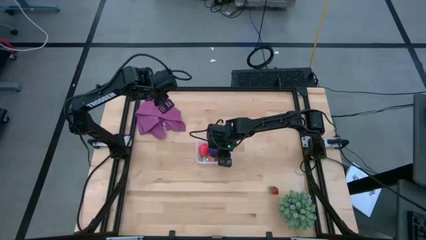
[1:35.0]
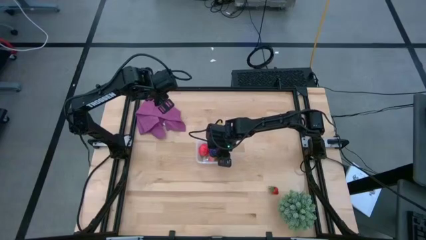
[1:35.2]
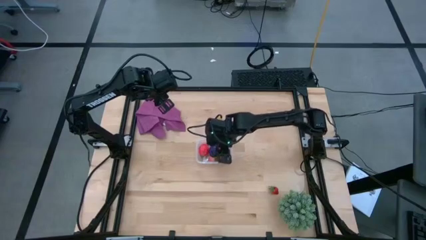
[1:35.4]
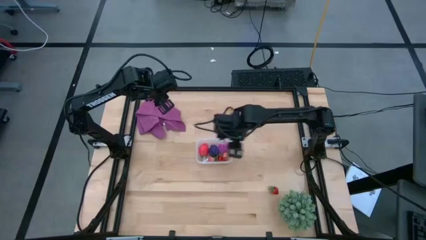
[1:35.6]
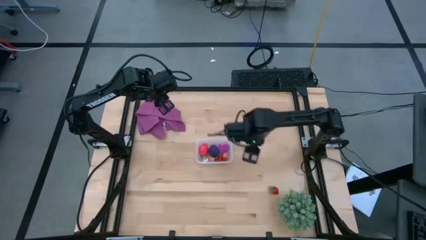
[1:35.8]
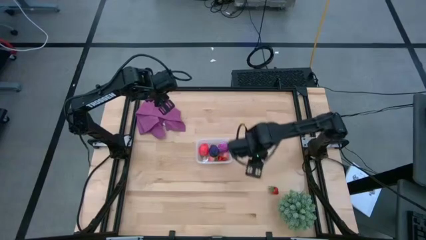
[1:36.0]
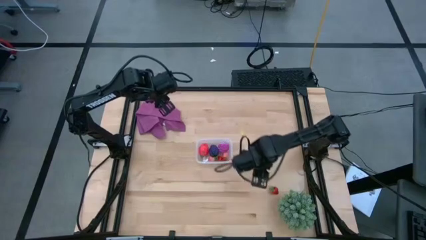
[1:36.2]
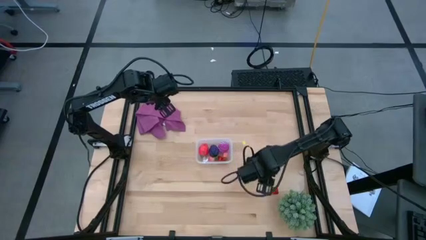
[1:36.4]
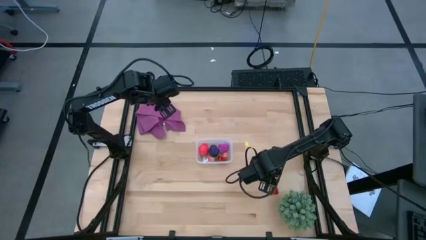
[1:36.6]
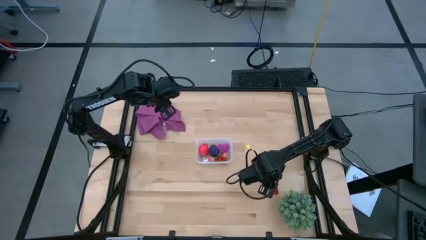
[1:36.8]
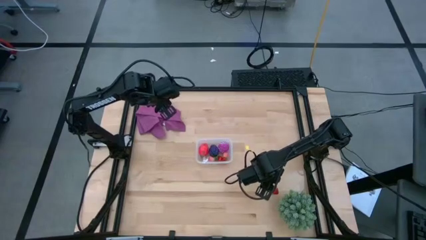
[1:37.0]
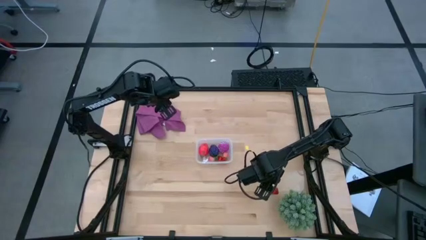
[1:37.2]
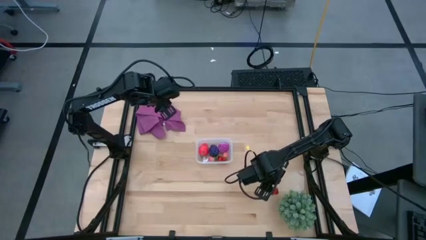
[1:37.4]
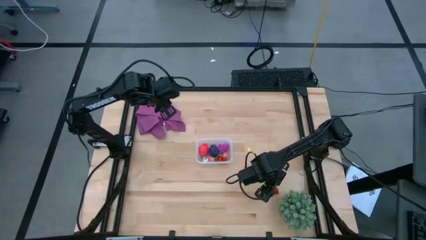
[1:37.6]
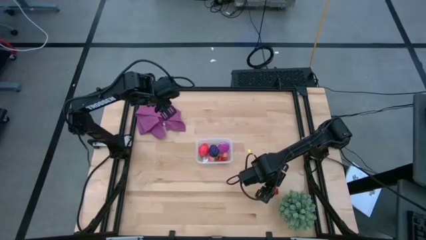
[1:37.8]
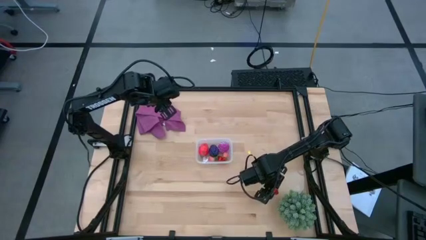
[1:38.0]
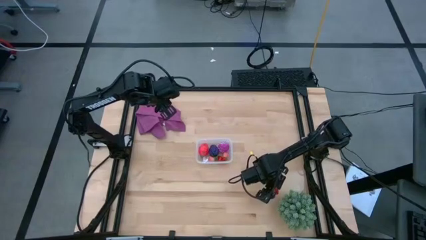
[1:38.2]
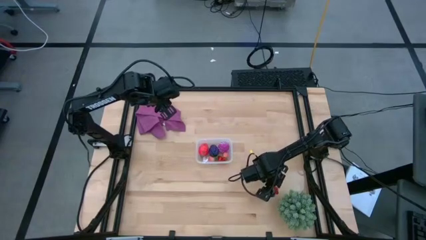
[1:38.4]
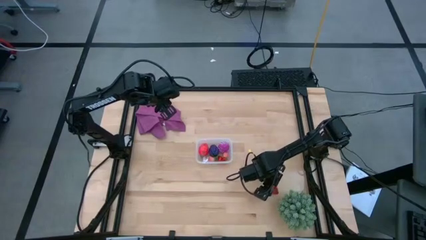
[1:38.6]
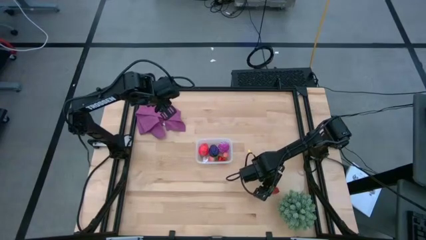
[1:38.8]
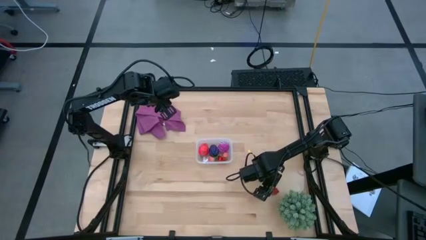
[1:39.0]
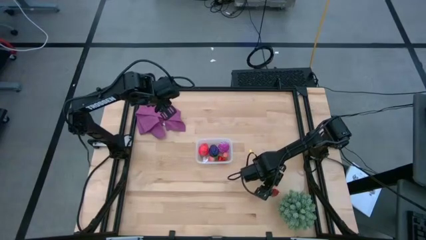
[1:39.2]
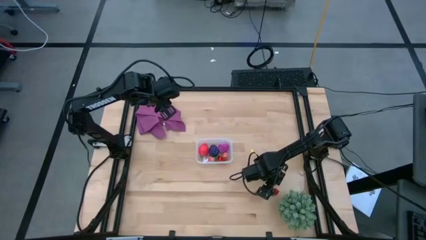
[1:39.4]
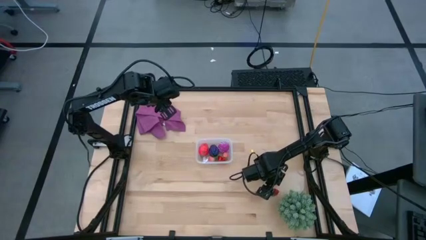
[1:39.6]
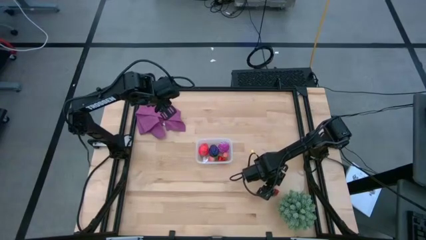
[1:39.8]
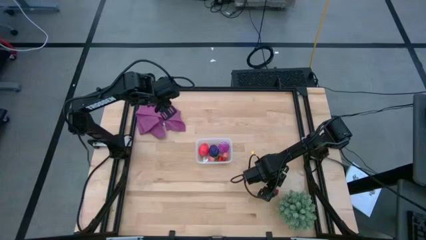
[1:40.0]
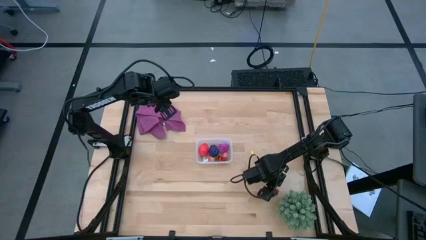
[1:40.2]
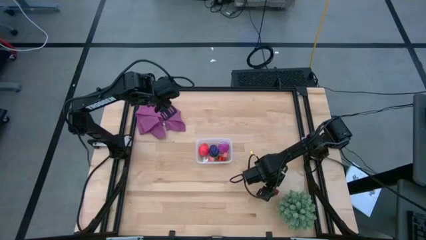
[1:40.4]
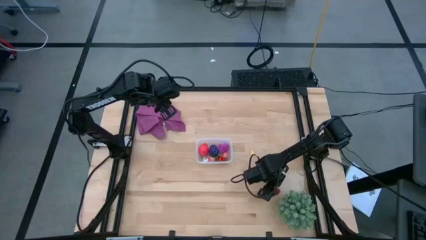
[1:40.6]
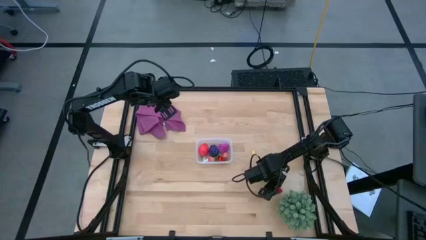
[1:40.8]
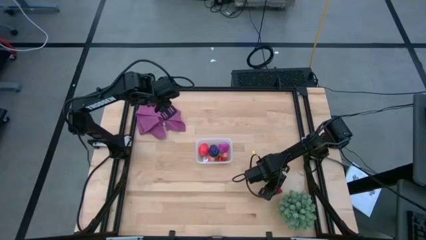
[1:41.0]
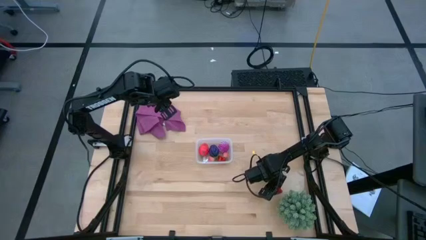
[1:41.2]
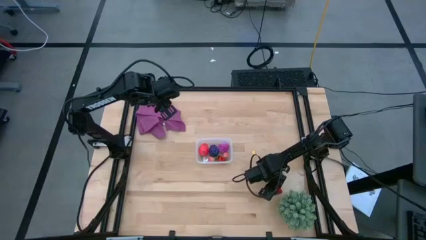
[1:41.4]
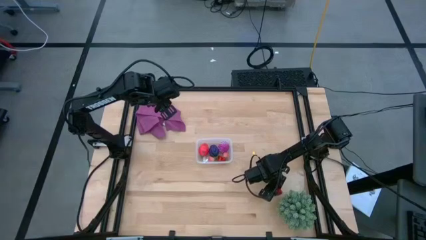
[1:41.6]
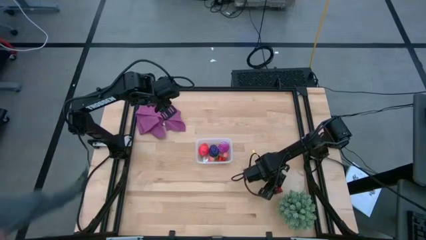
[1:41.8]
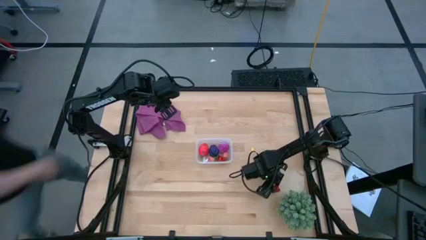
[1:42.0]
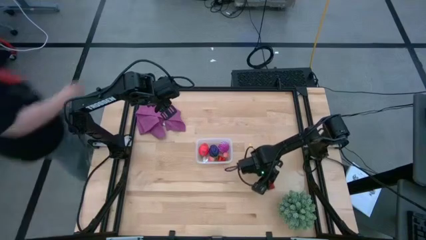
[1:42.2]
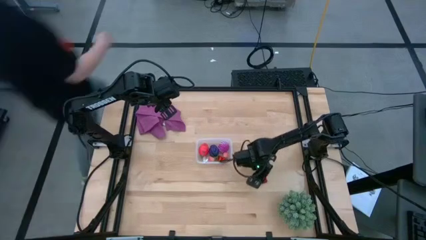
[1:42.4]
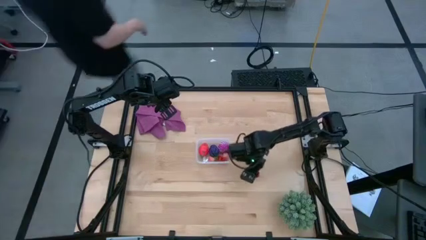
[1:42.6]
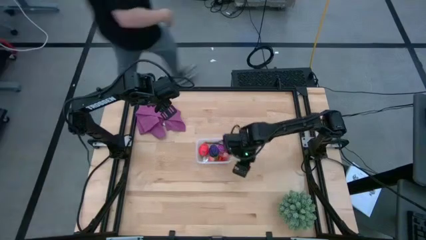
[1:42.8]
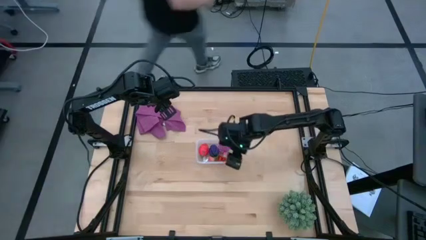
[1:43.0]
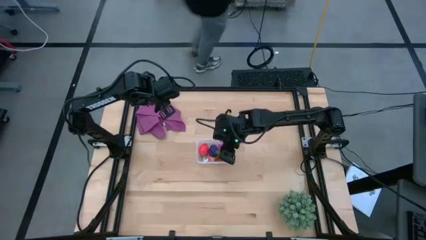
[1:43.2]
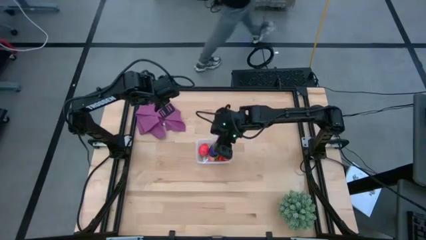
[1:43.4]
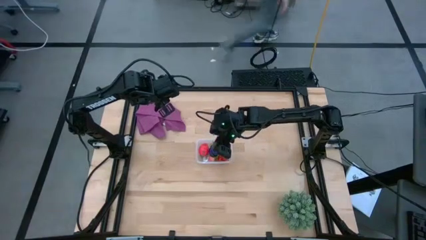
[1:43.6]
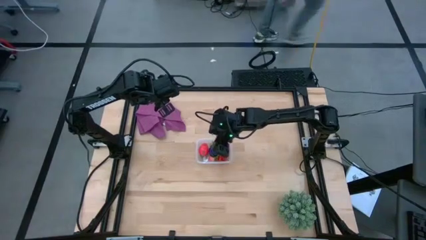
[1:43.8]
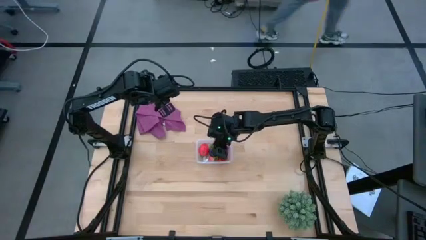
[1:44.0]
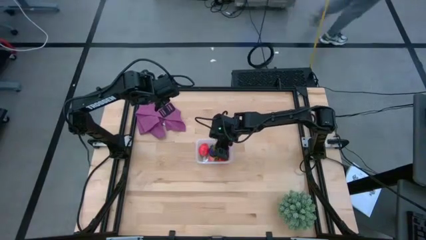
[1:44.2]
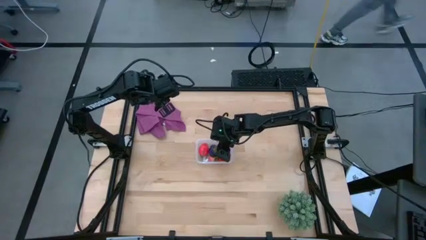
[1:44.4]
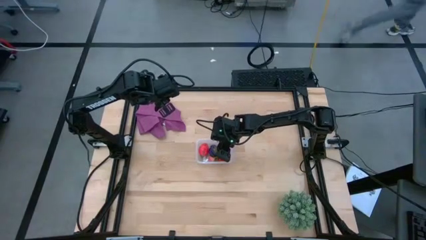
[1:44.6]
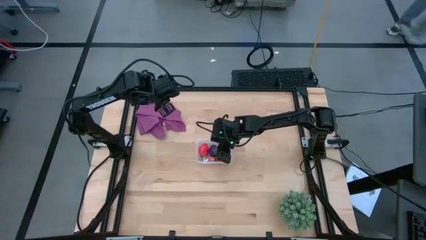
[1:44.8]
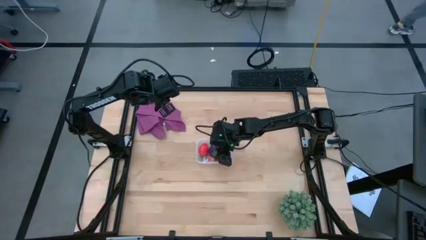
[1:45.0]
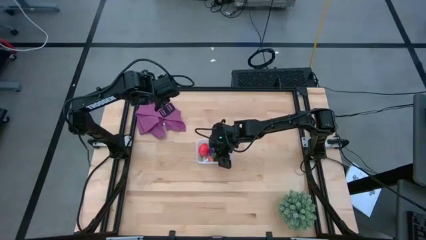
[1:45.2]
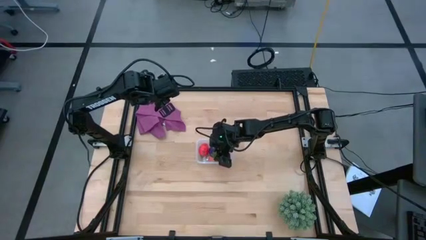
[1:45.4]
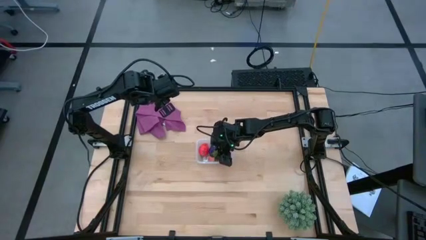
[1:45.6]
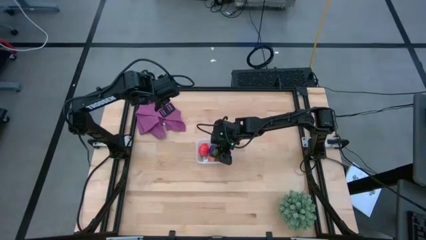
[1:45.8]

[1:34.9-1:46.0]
Task: Pick and placing Produce into tupperware
Put the red strawberry into the transparent bin

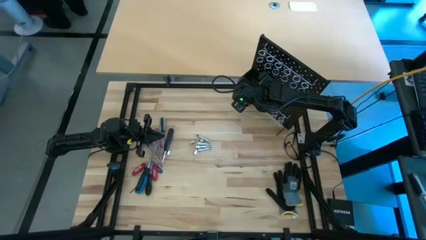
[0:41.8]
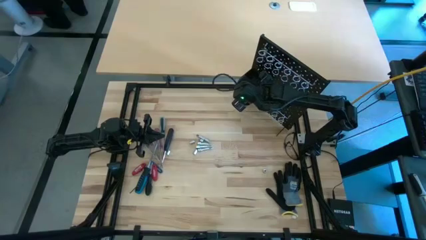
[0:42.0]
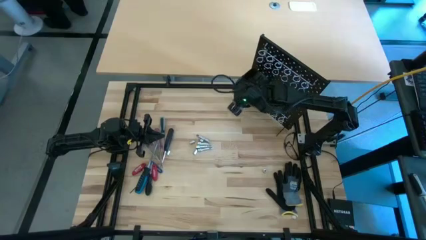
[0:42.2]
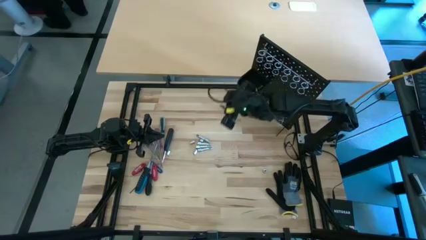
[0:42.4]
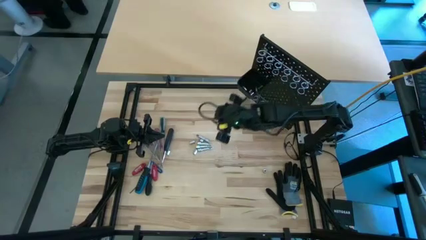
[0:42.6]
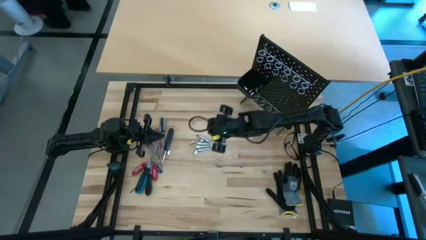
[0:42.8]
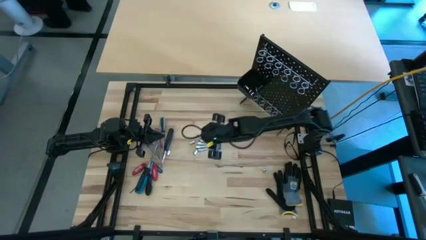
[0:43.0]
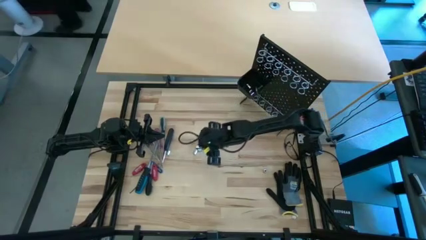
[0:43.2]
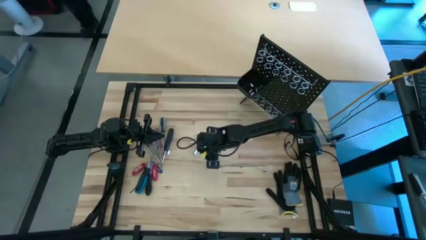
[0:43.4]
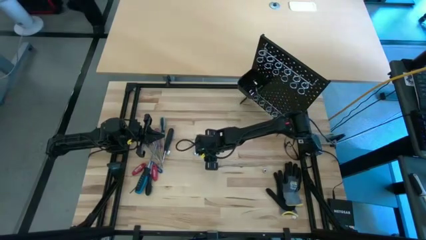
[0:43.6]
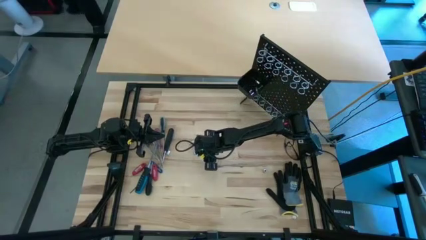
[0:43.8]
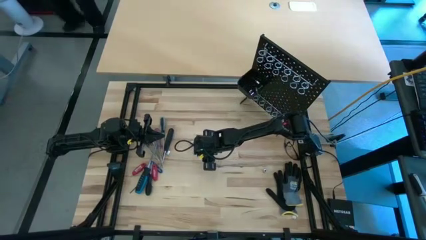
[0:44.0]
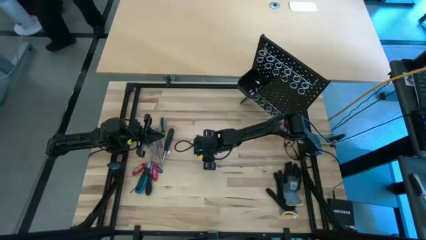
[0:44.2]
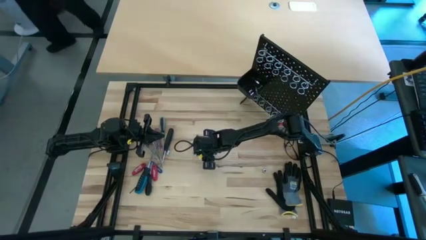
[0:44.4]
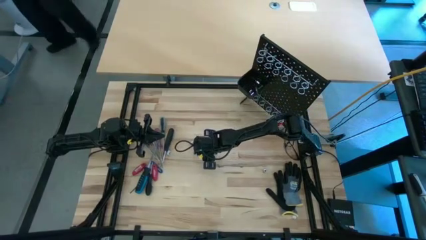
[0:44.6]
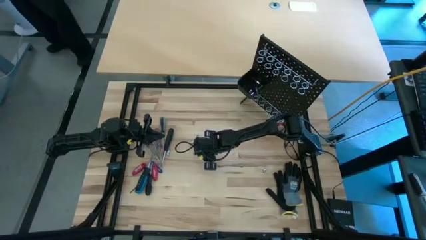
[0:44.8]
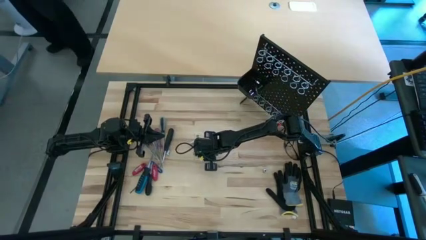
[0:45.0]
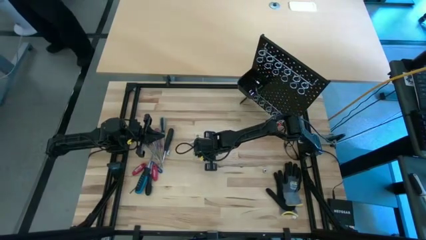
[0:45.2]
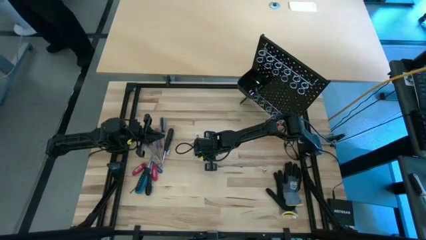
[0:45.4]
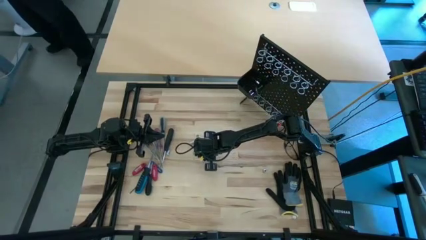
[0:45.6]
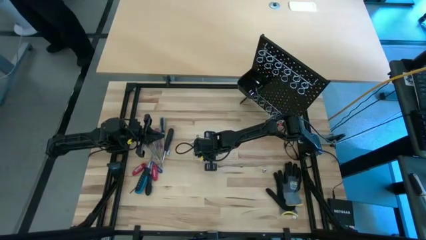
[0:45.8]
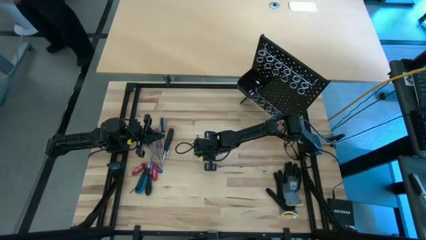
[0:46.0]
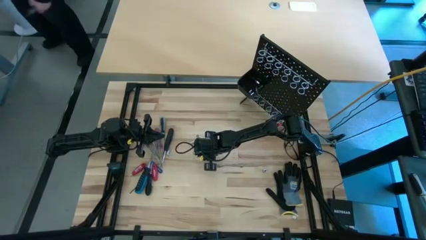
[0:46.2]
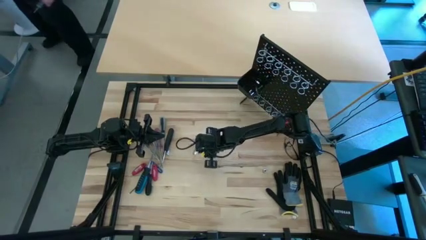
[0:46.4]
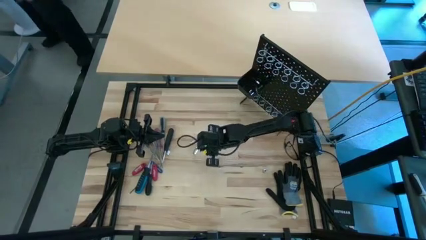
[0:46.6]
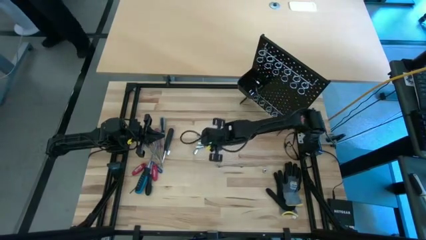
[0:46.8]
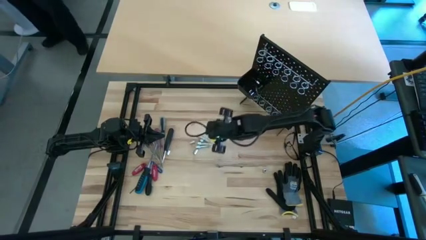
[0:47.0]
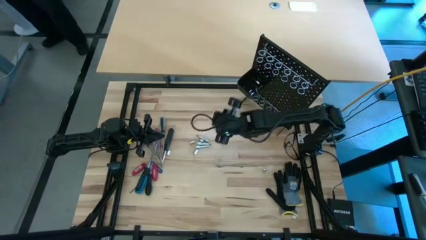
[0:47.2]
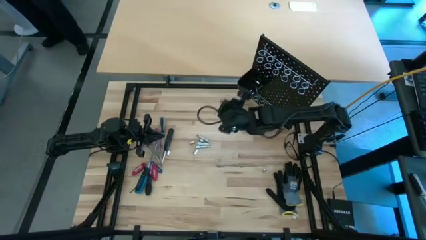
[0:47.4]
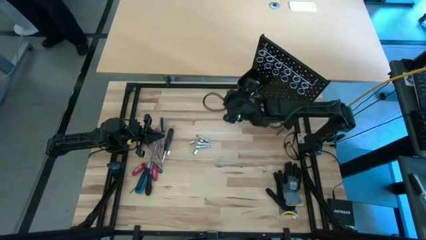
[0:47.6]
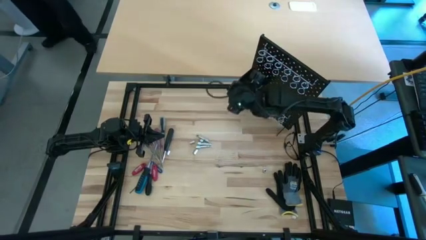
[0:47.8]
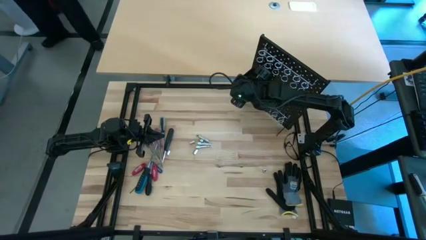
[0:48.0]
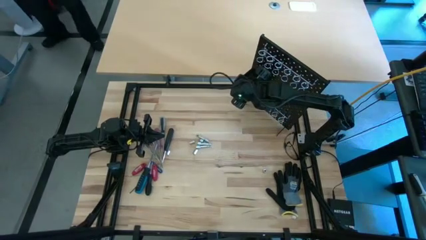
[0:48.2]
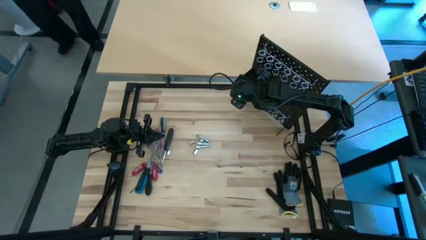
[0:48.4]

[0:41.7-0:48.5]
Task: Hang tools onto peg board
Put the extension bar into the black pegboard bin
